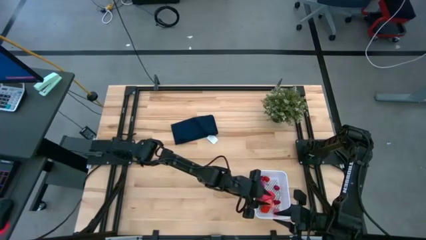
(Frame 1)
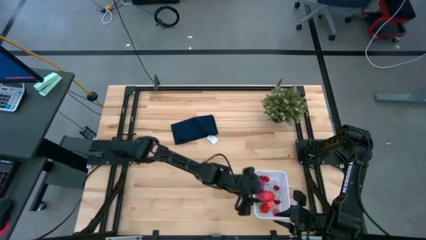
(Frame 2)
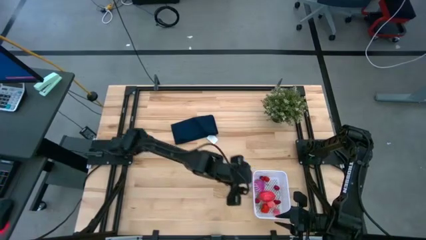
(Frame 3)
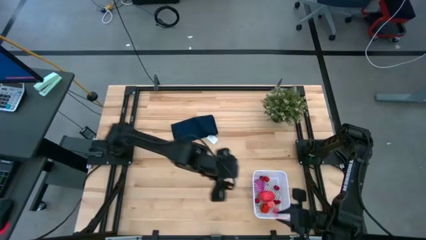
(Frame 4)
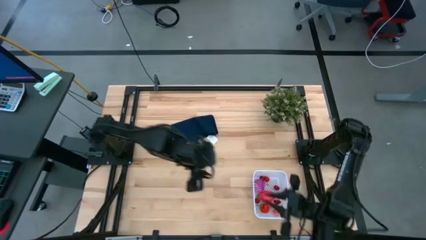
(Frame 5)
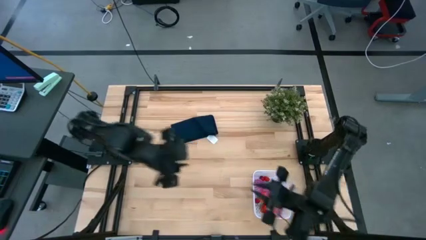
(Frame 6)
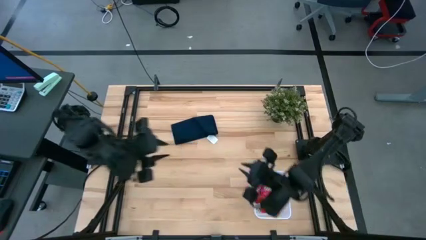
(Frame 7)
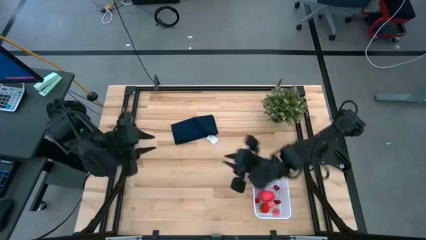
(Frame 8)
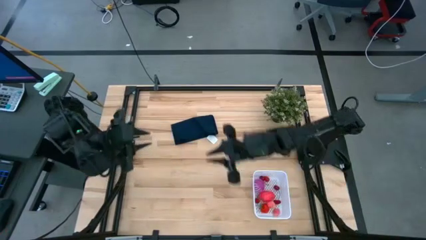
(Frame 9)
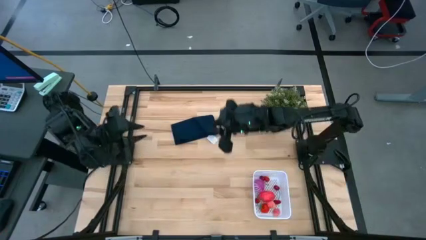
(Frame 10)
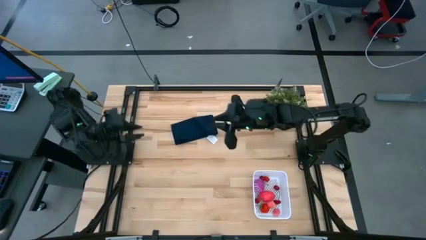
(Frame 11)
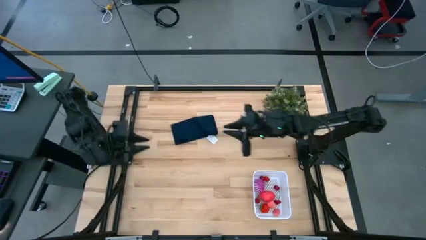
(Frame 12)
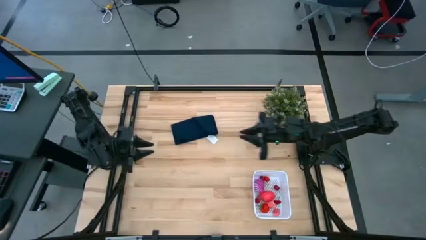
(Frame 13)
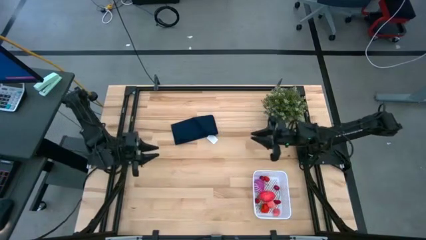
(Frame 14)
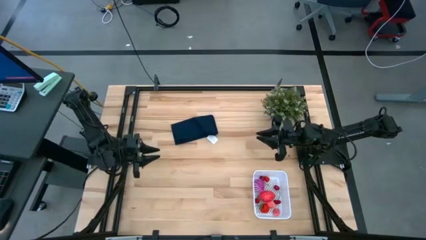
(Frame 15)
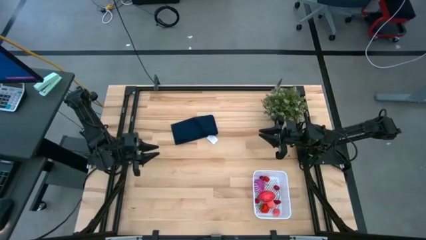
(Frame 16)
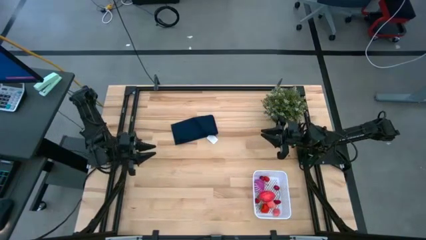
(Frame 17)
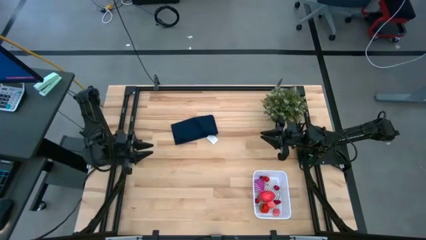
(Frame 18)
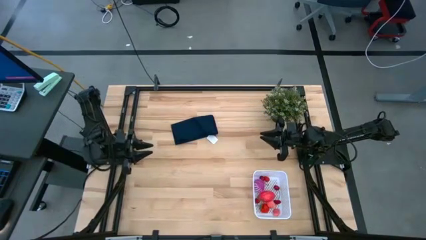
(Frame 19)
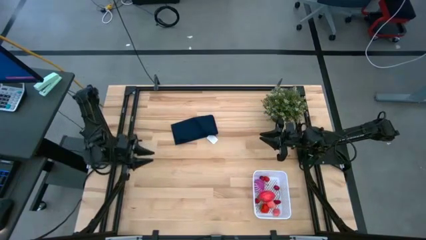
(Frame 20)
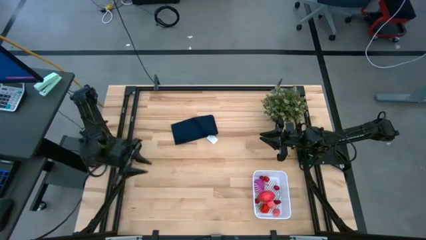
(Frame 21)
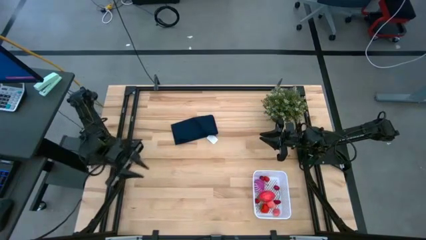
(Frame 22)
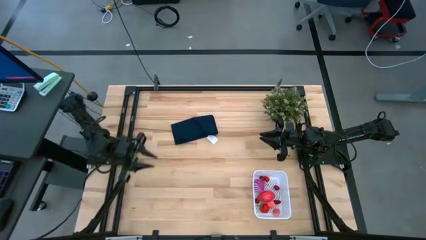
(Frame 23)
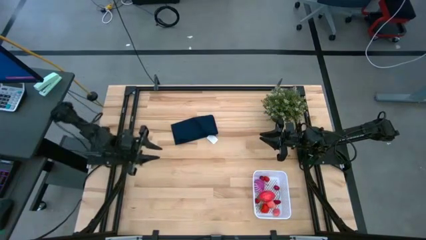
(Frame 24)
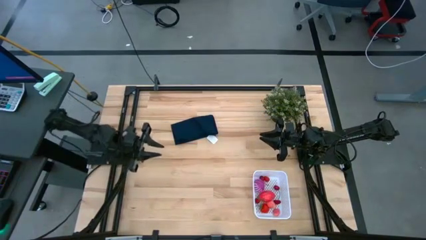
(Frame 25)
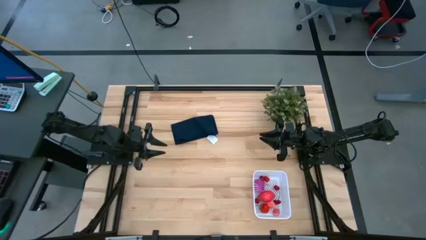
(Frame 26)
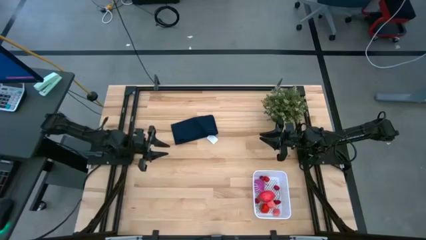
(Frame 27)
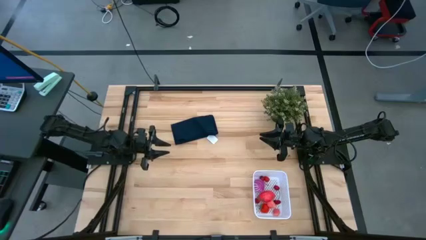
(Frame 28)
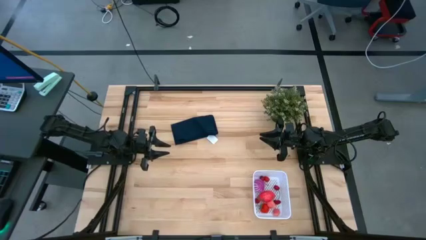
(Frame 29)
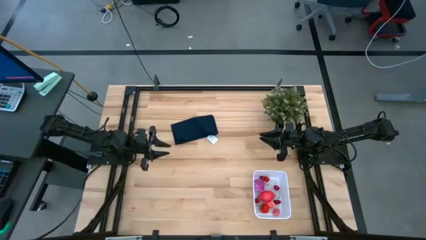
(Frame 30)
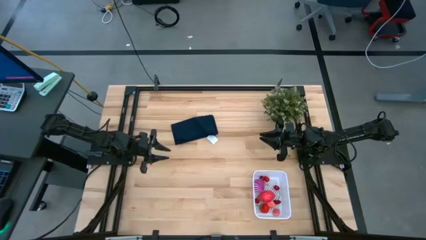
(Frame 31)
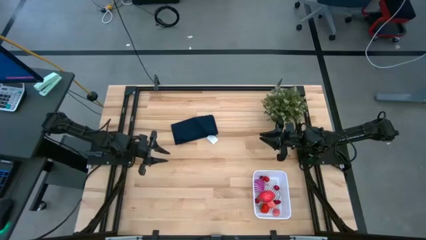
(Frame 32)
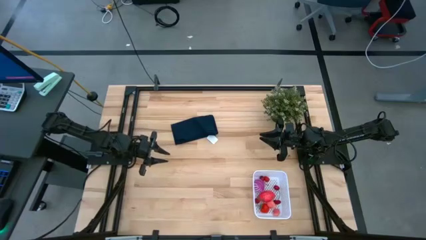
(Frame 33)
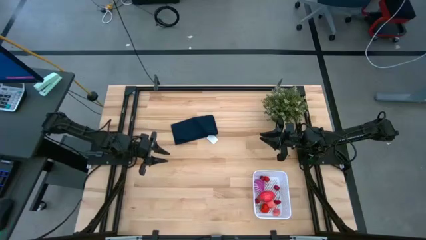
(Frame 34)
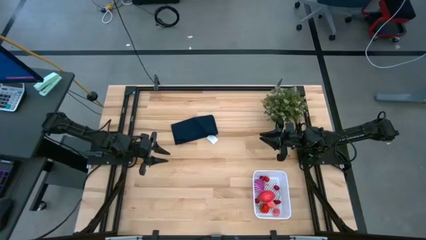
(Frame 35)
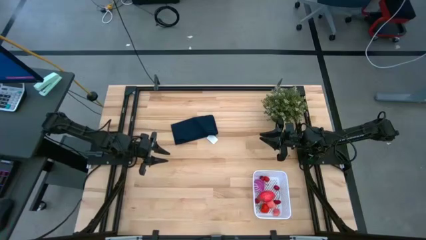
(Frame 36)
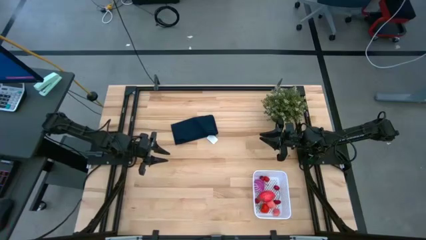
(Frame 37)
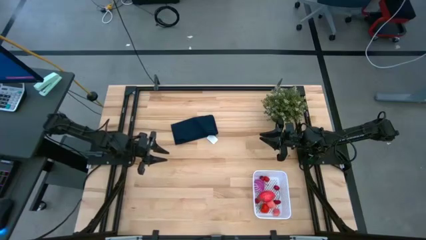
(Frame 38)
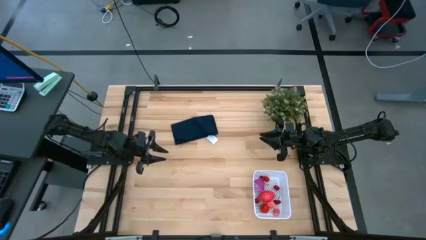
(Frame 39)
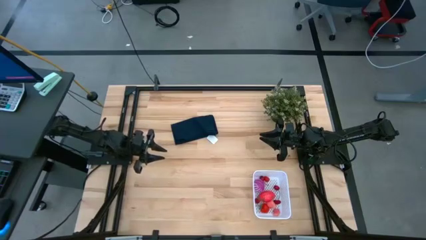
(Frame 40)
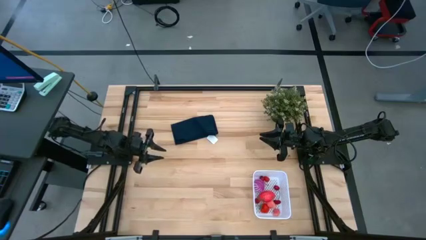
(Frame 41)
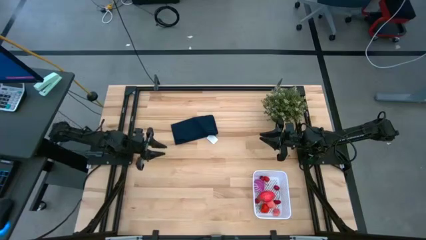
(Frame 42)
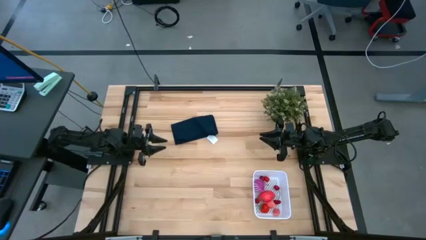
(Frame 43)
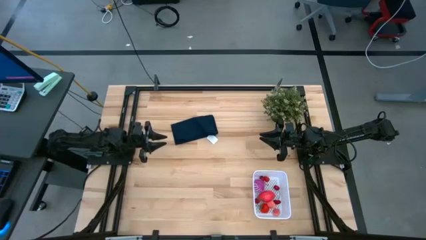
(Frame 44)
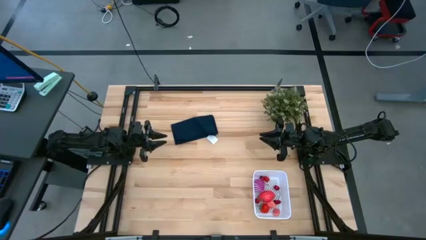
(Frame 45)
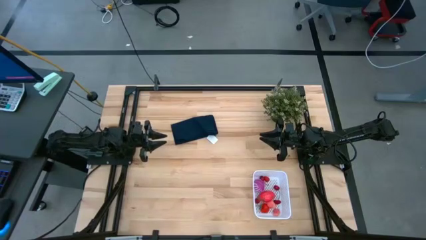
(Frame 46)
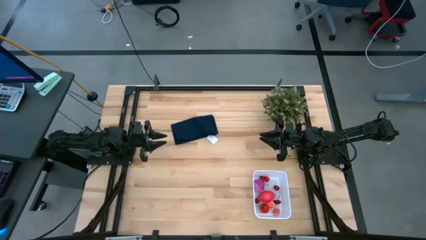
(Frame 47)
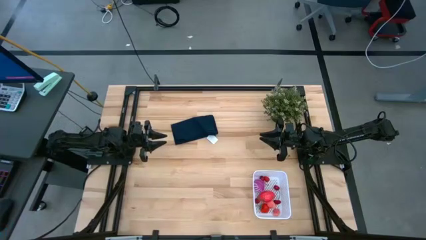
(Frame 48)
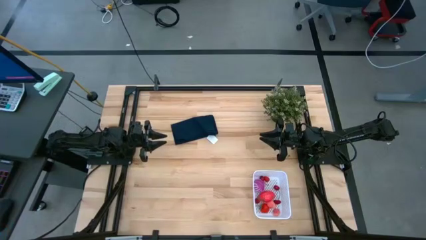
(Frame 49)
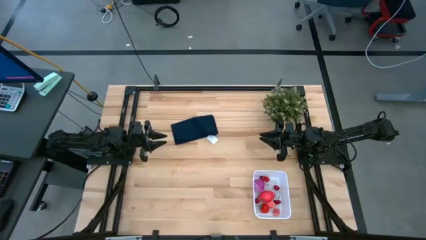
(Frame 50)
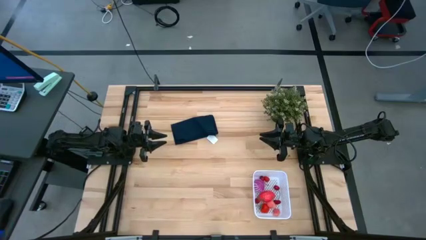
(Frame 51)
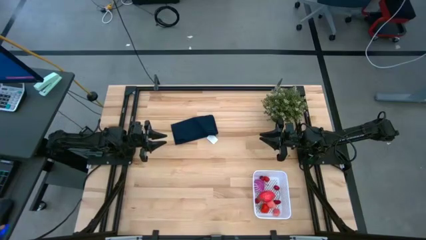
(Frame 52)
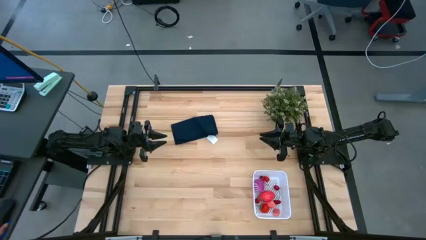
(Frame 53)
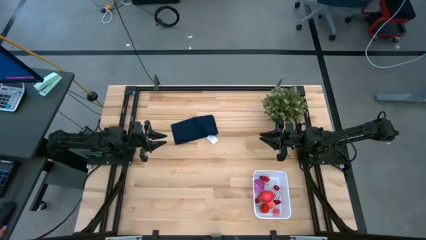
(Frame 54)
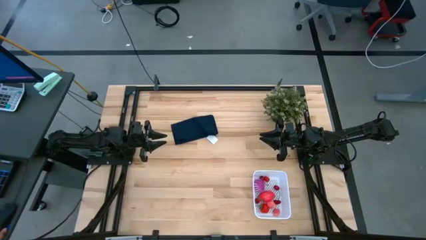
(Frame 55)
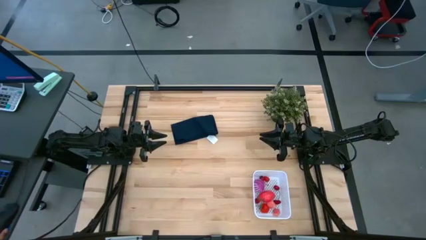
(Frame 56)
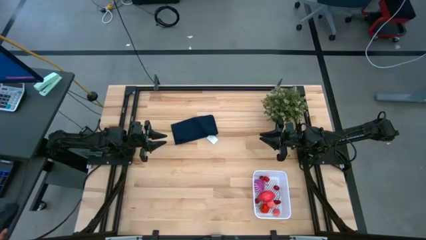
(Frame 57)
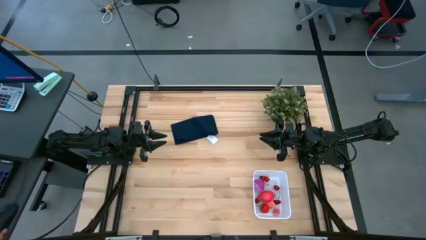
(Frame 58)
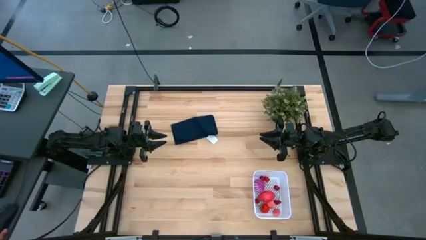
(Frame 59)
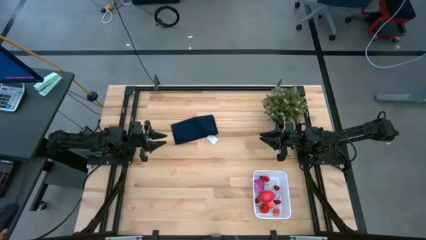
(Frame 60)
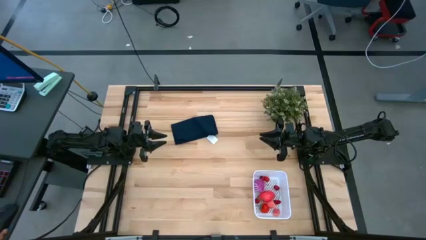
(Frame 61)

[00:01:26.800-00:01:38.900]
Task: Pick and placing Produce into tupperware
Return to Home Position
